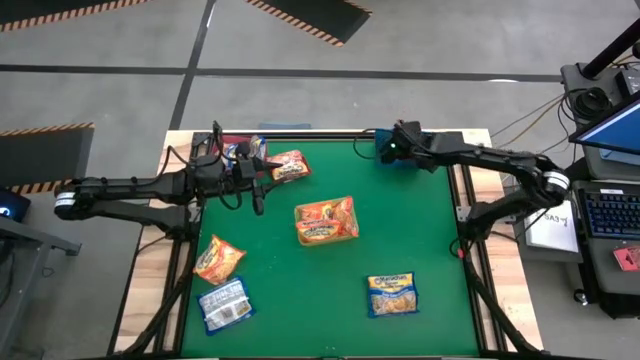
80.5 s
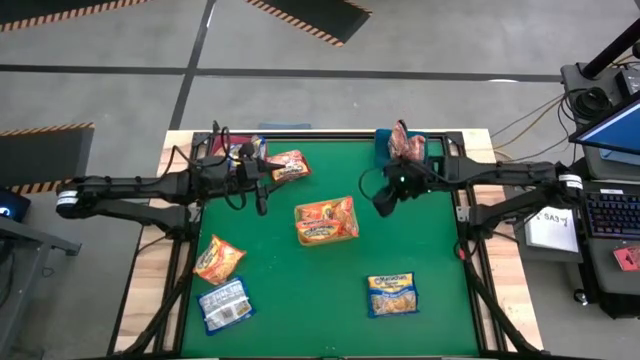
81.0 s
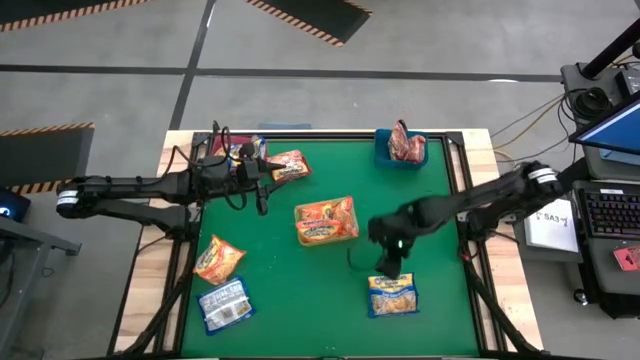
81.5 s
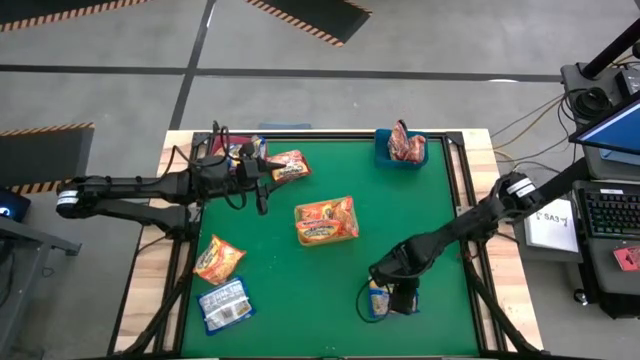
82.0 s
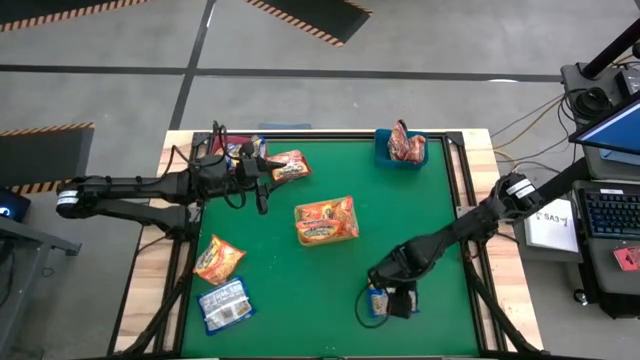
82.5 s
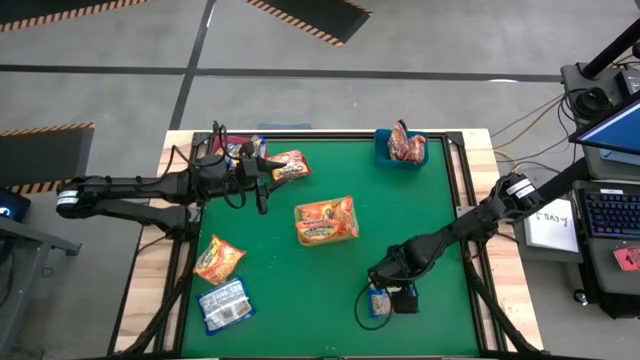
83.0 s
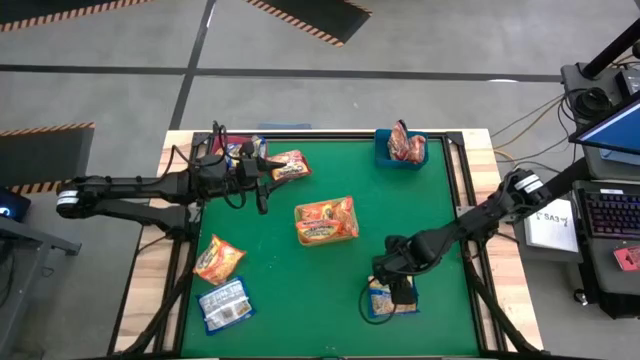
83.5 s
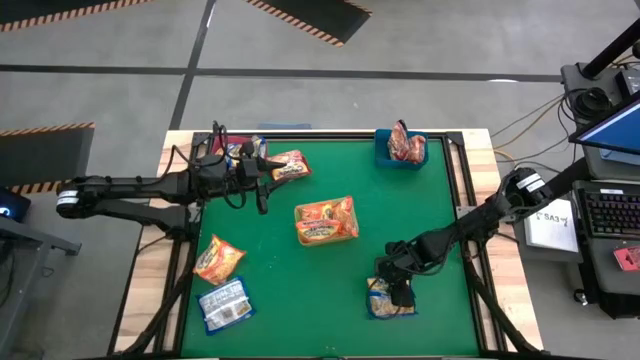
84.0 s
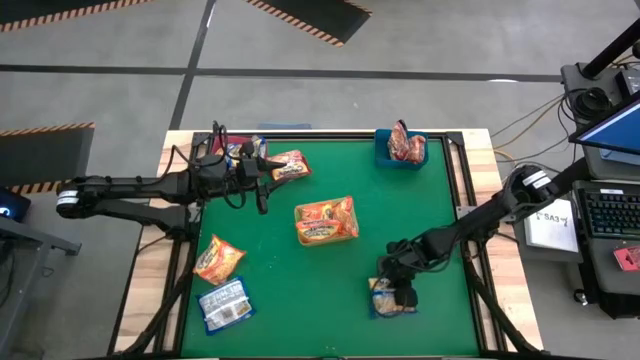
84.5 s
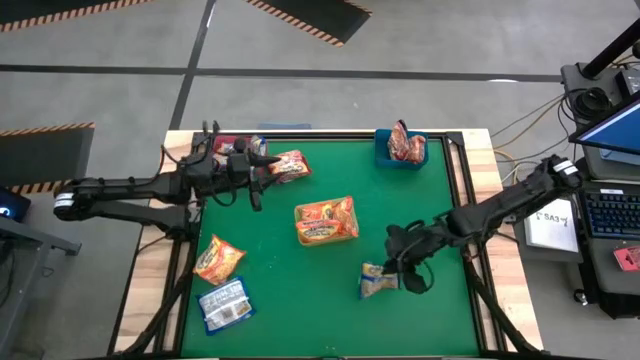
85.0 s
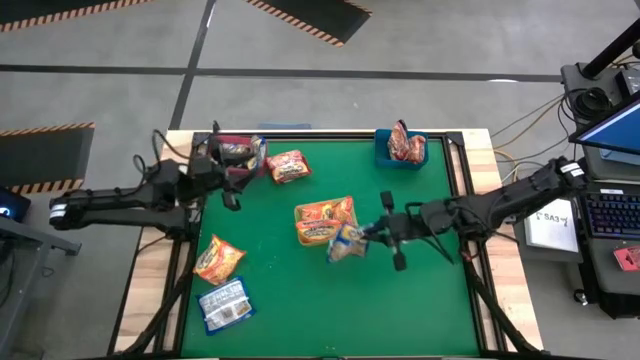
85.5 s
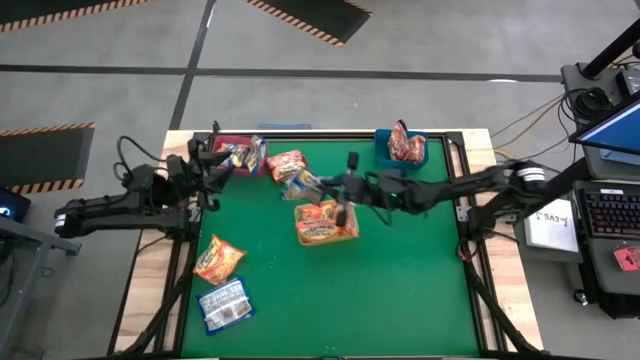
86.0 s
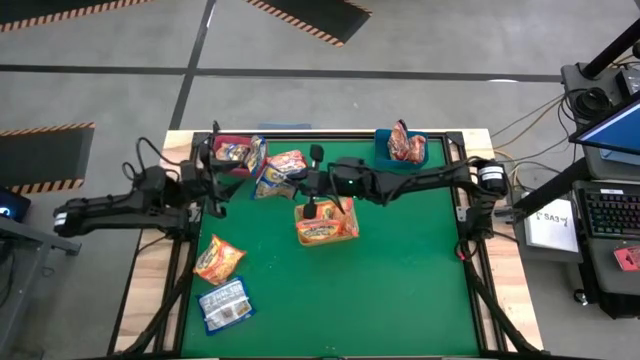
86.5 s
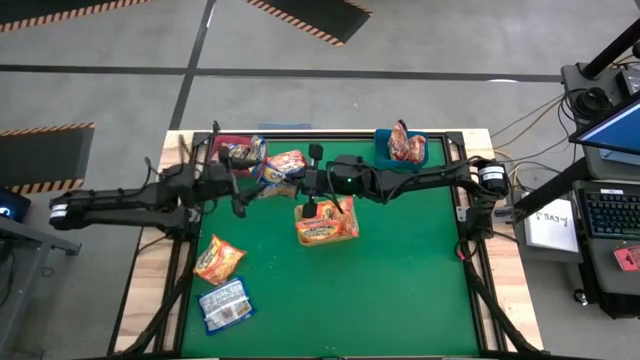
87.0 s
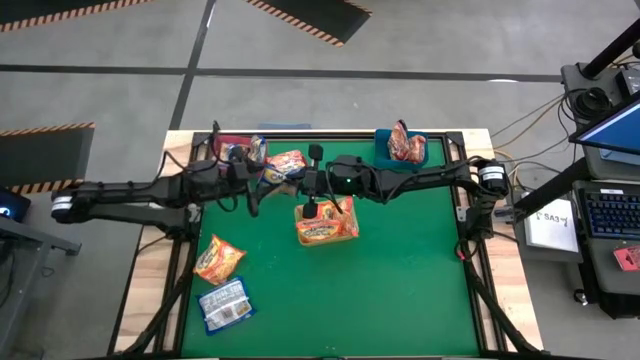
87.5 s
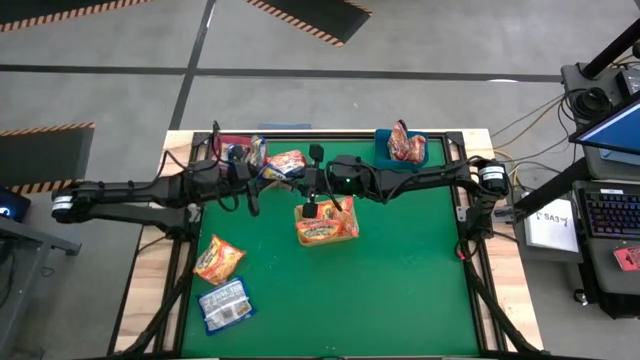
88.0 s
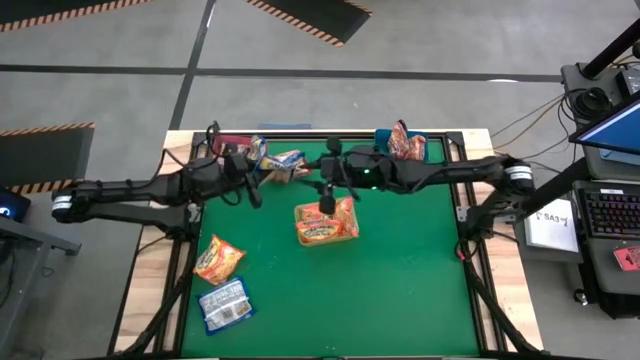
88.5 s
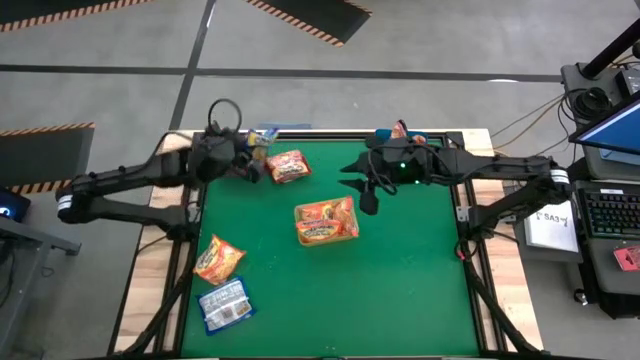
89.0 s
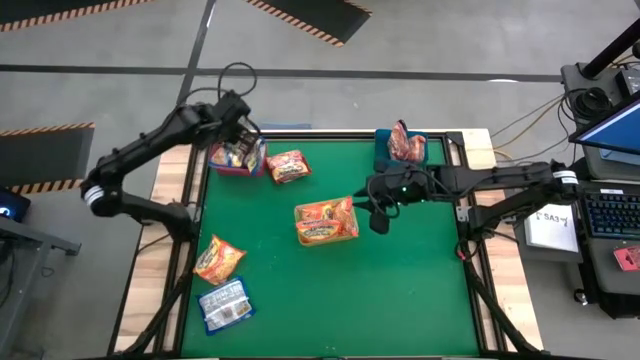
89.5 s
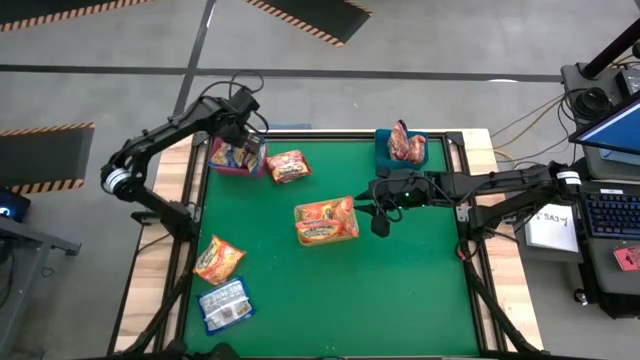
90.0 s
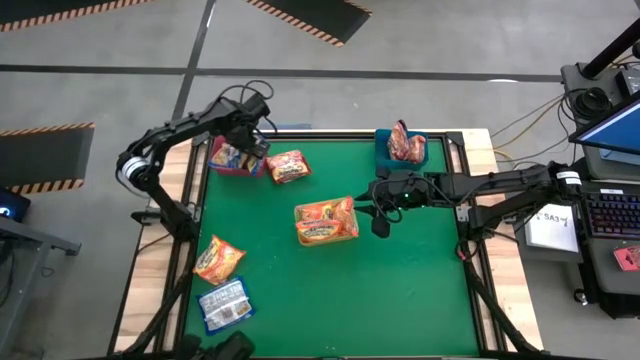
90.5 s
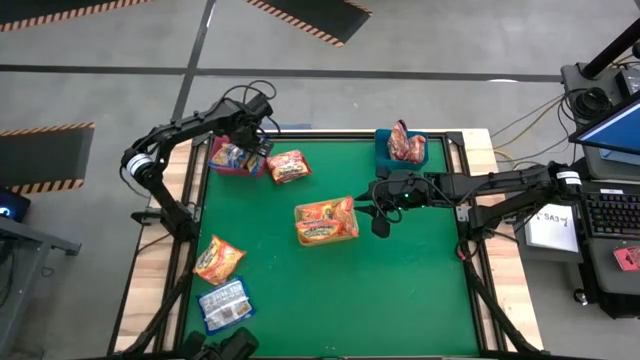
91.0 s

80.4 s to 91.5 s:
Task: Sort Maruchan noodles
Put the blue noodle pack into the red bin

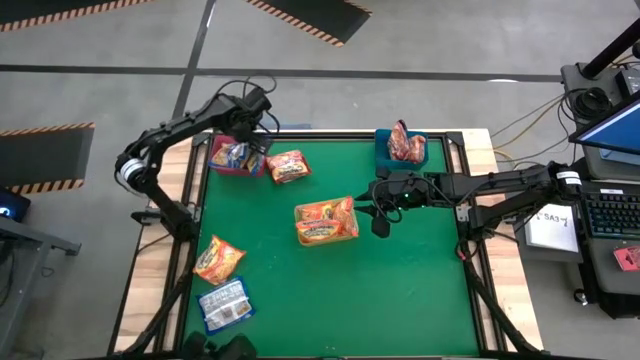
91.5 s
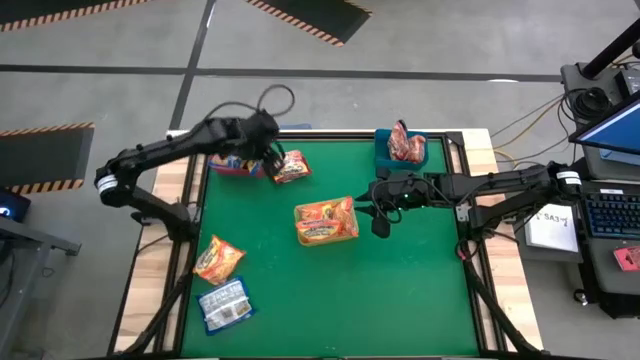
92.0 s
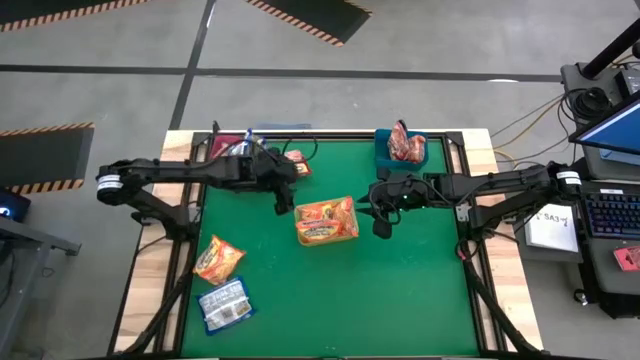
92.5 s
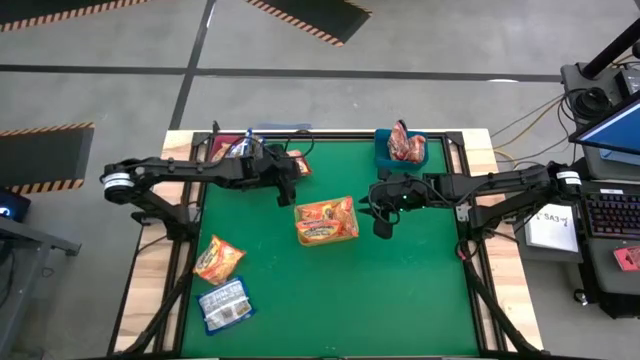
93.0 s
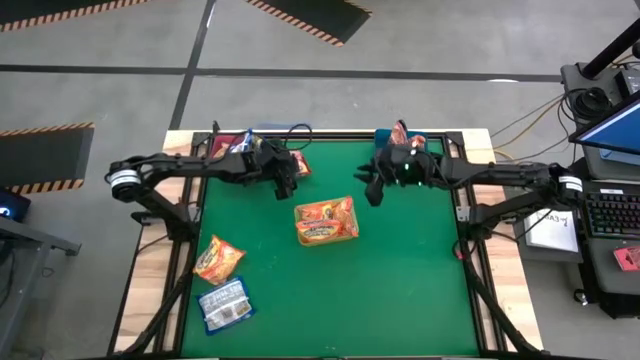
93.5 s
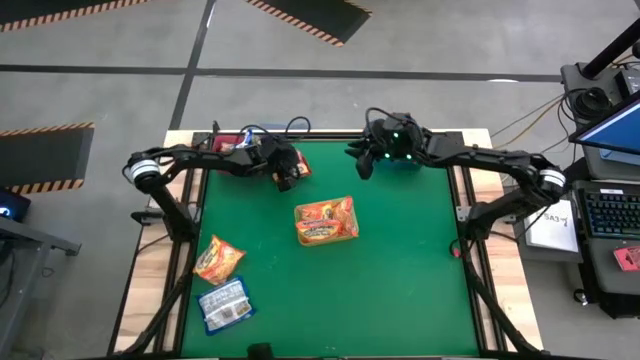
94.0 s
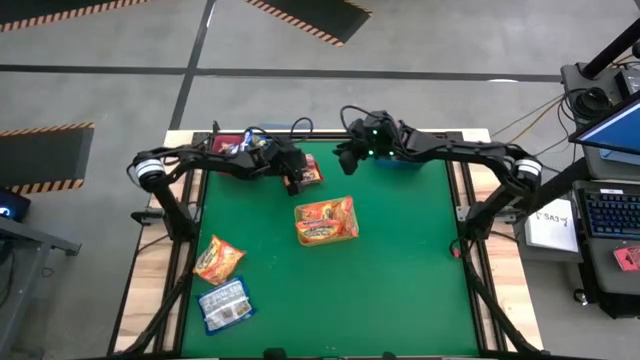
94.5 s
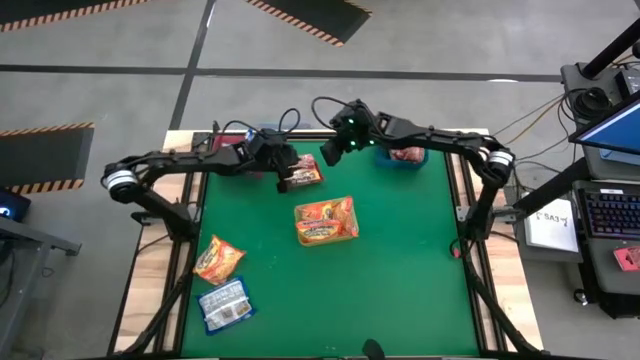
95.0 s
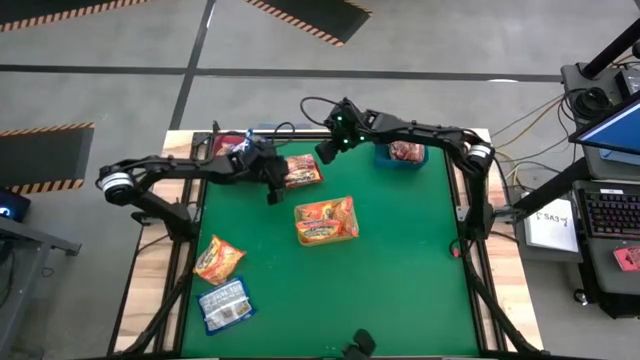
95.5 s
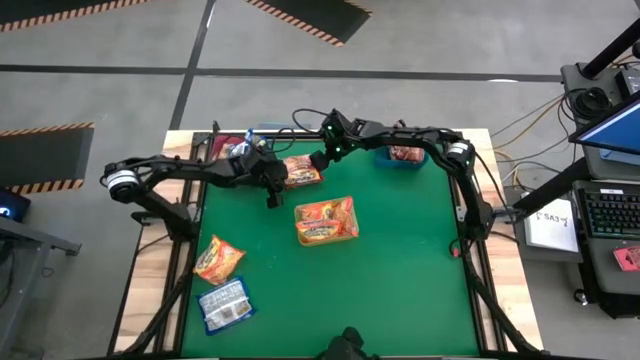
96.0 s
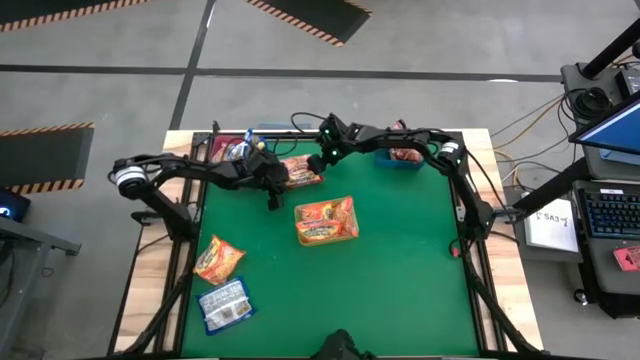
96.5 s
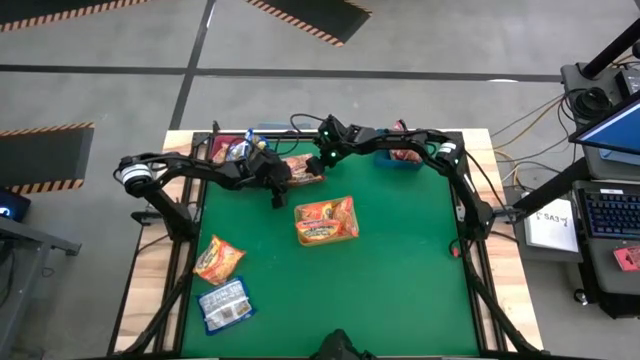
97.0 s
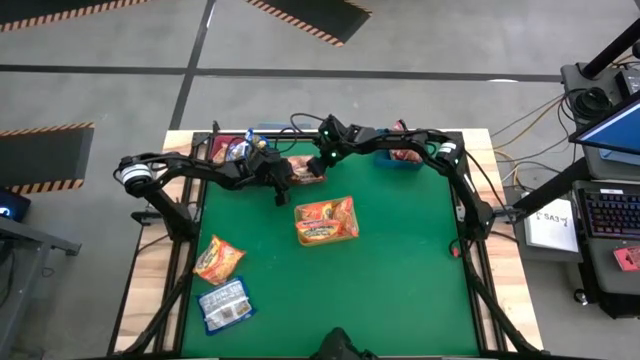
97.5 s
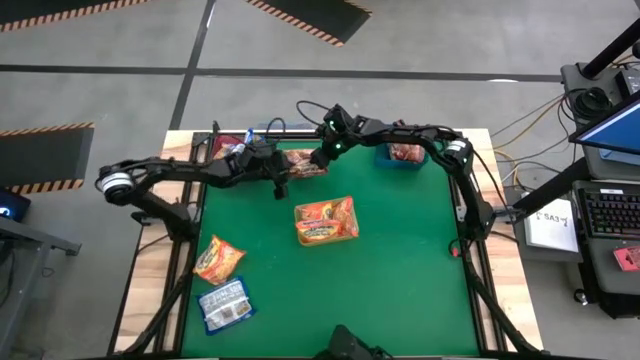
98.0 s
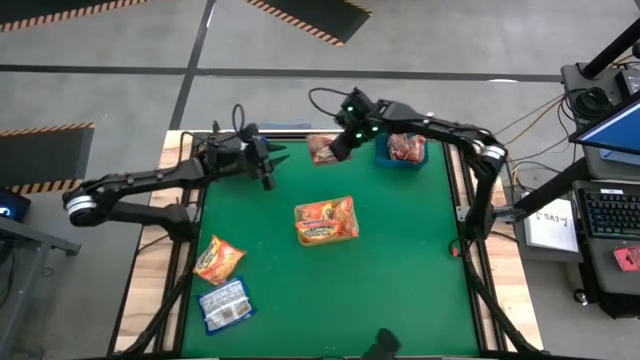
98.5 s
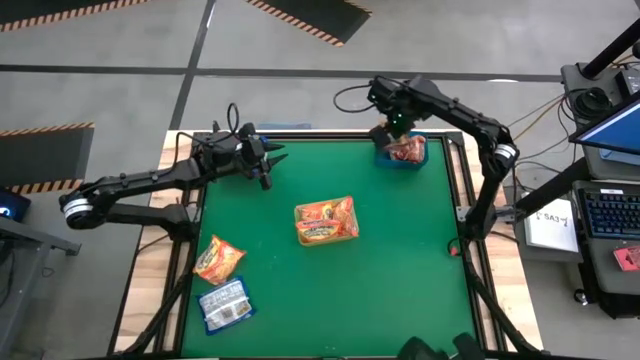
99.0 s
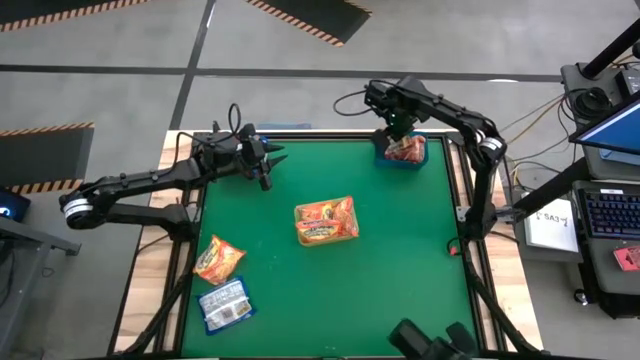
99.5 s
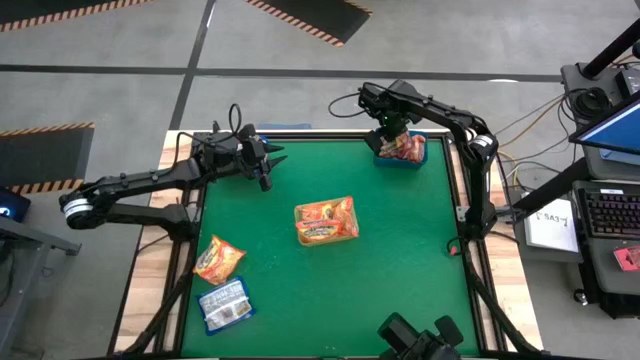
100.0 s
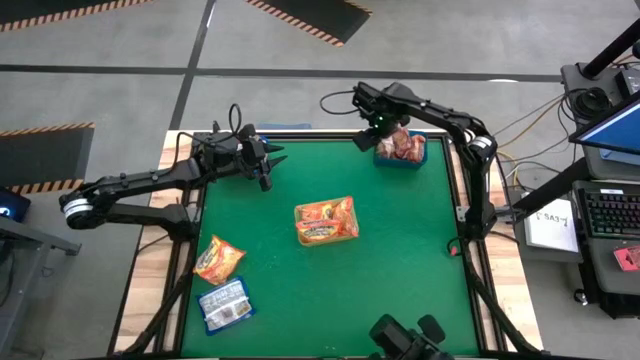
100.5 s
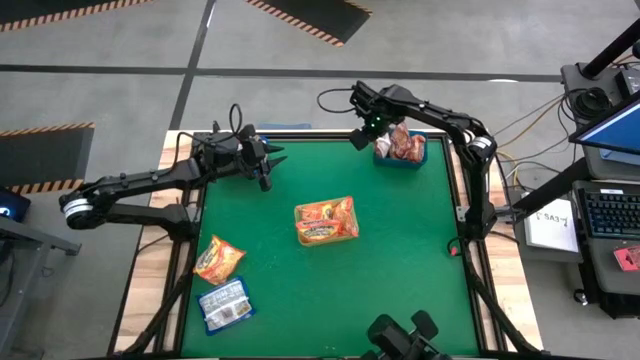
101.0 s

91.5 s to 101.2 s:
Put the red noodle pack into the blue bin
